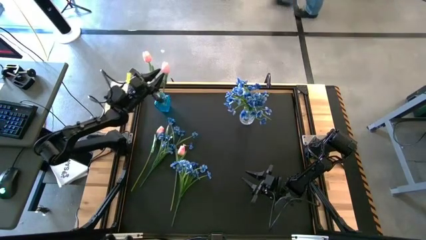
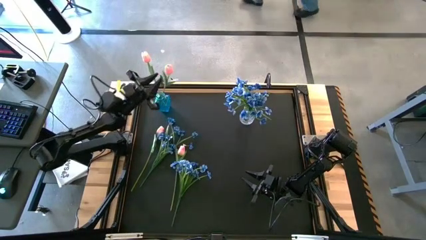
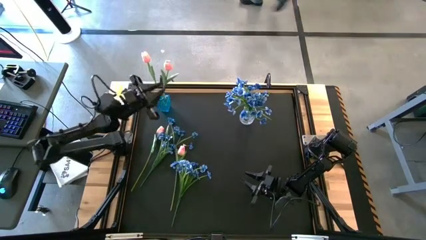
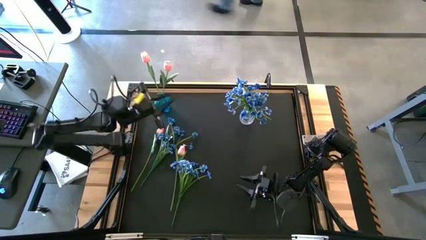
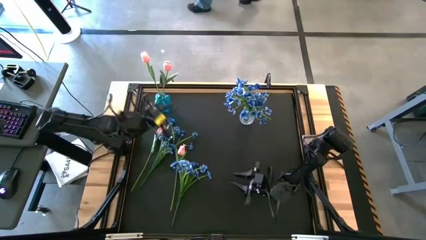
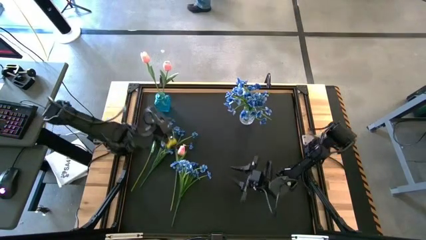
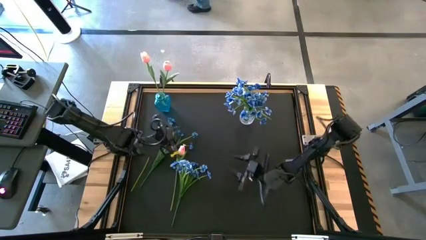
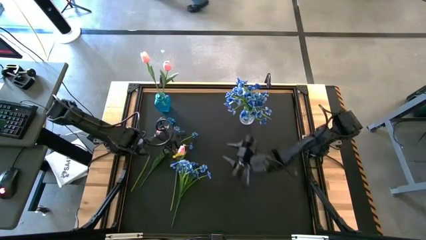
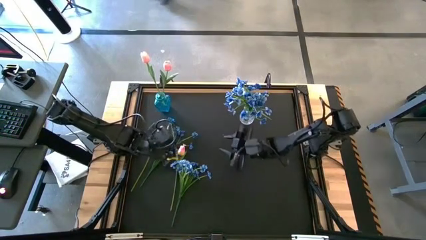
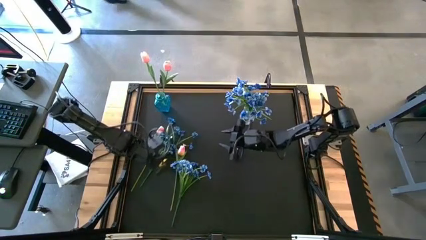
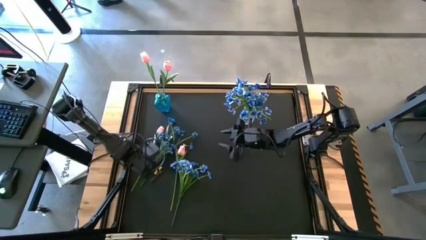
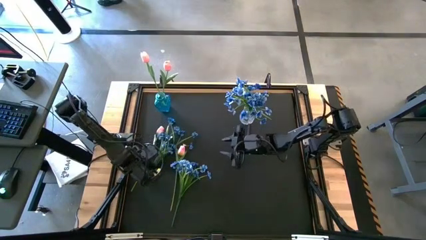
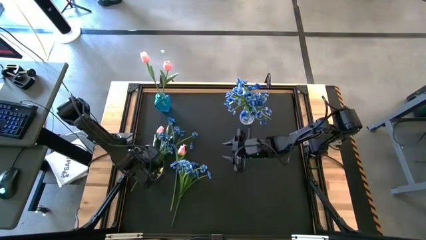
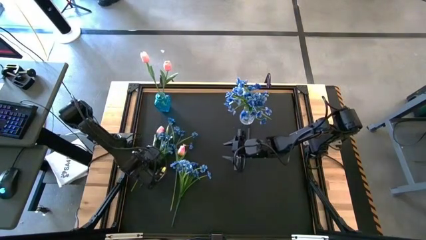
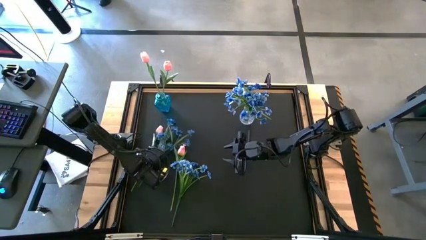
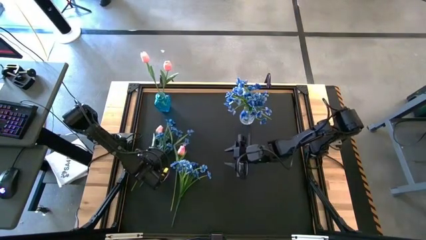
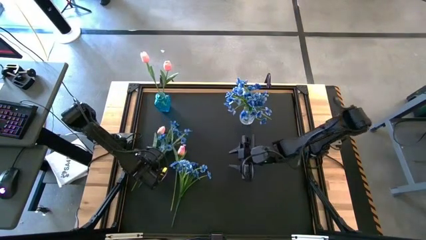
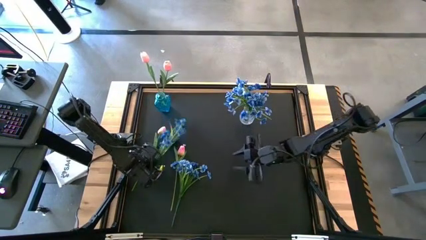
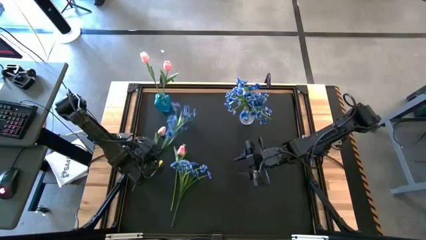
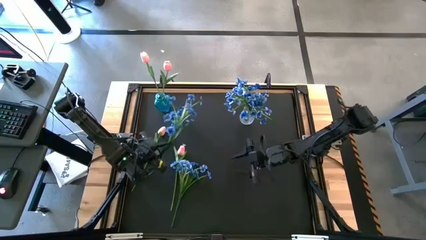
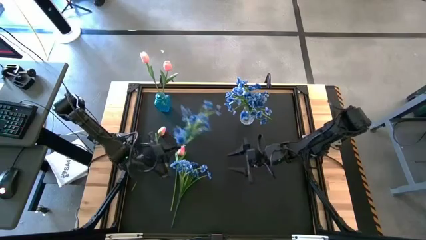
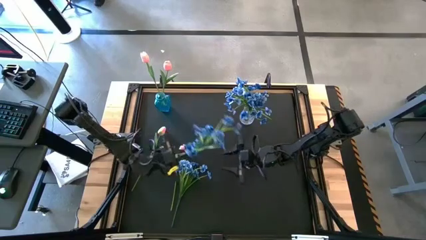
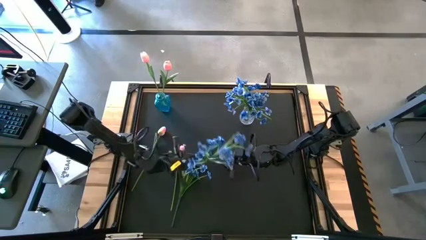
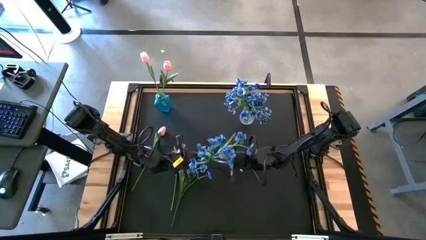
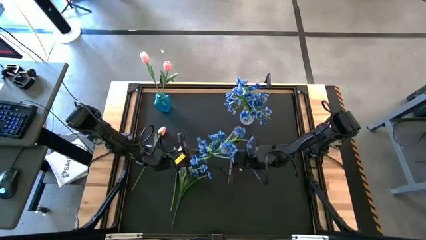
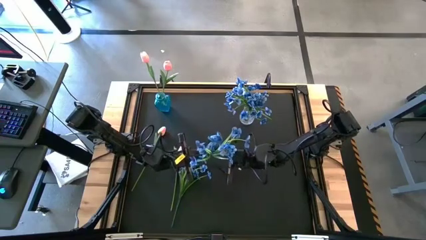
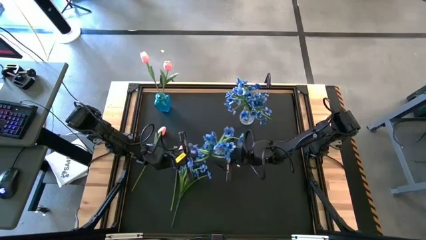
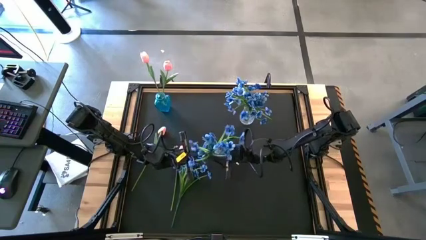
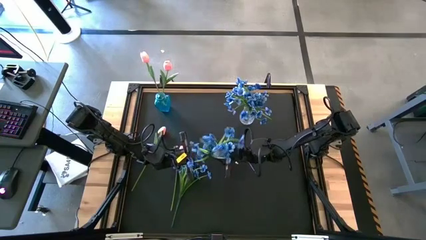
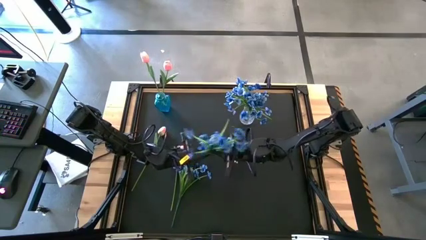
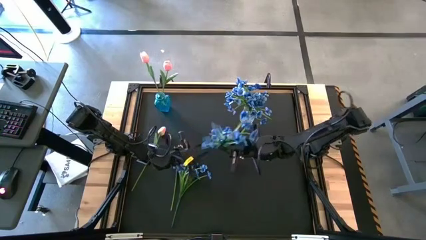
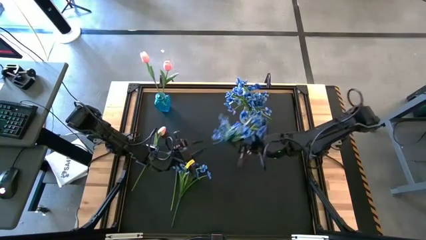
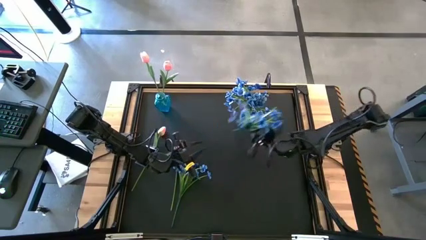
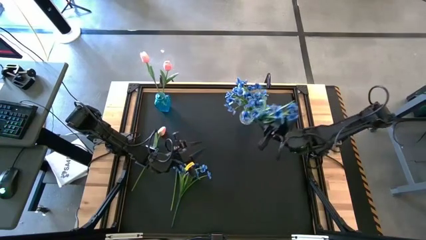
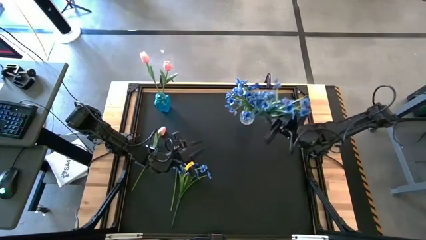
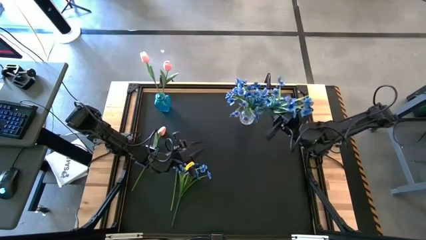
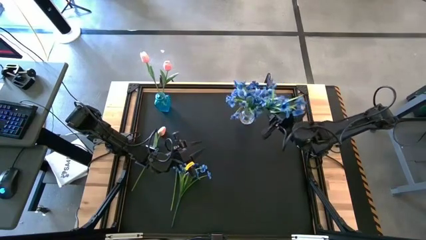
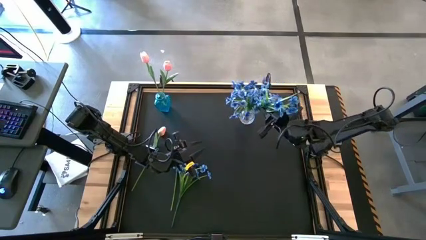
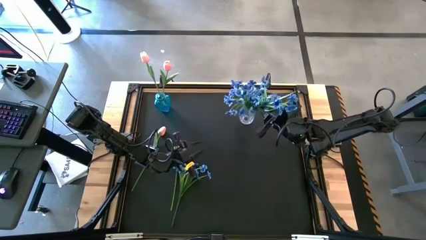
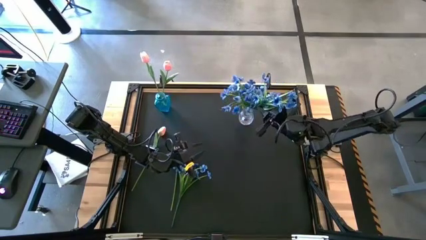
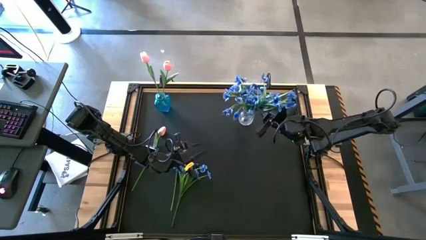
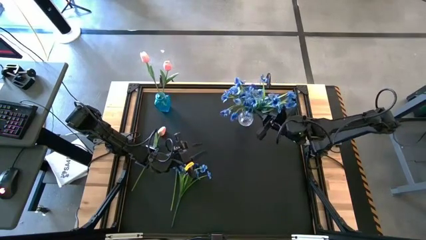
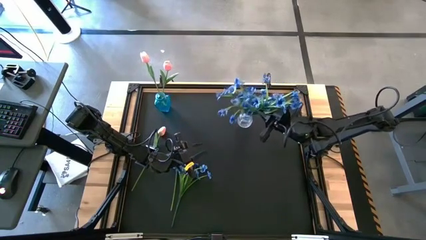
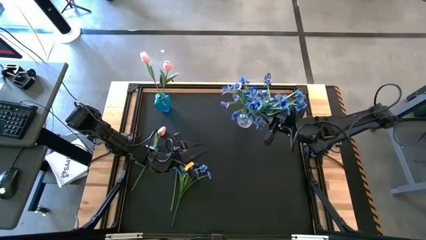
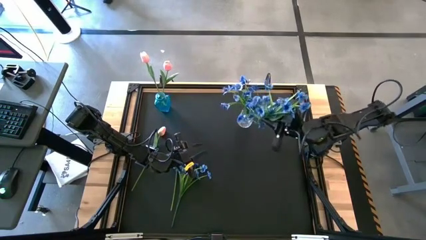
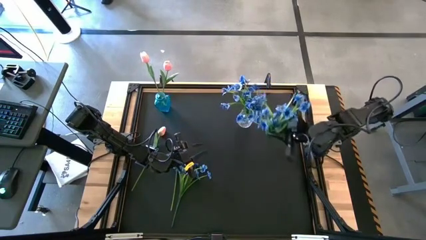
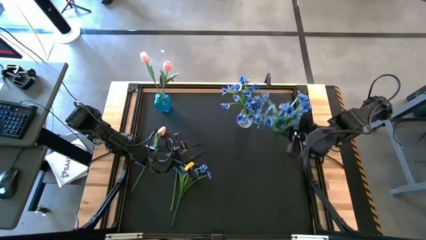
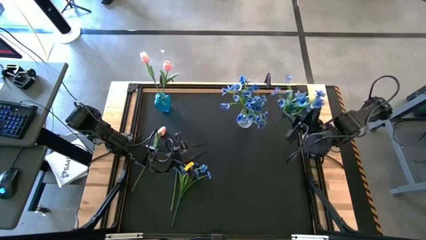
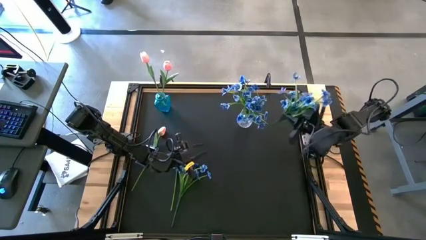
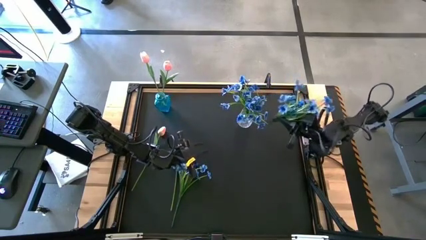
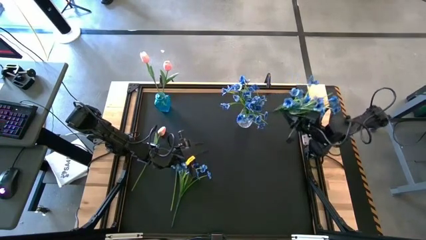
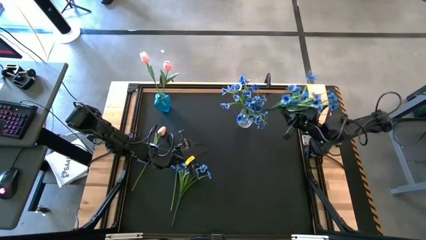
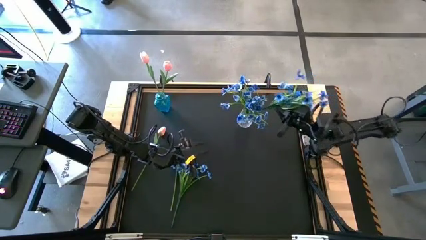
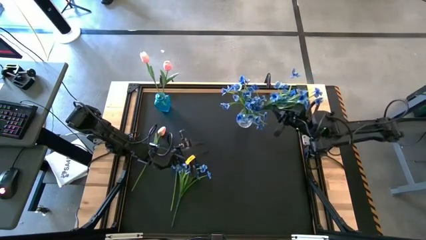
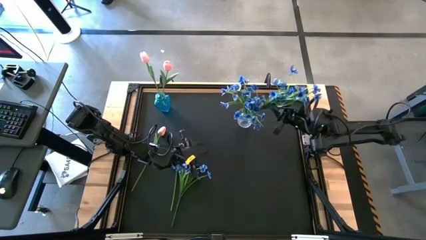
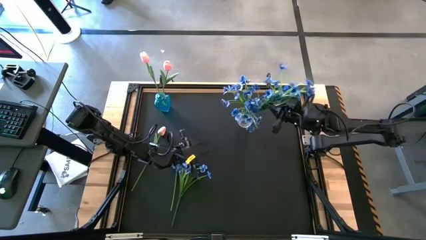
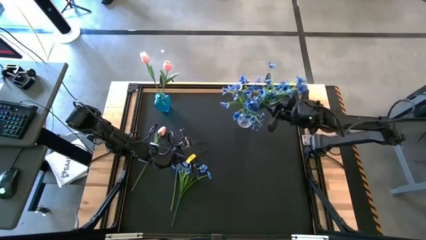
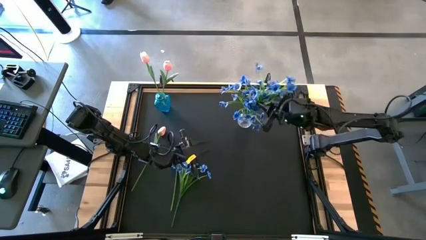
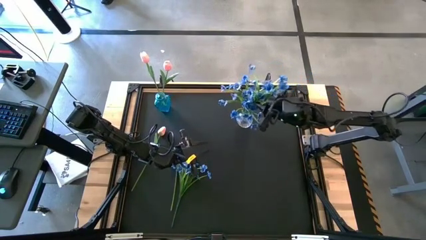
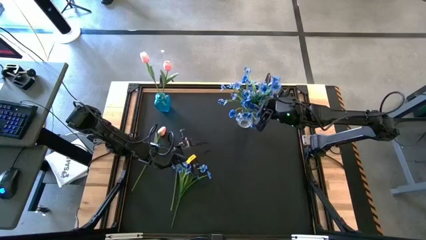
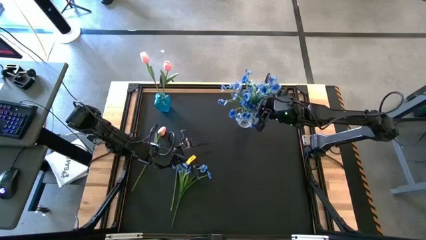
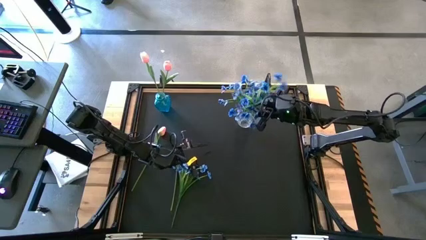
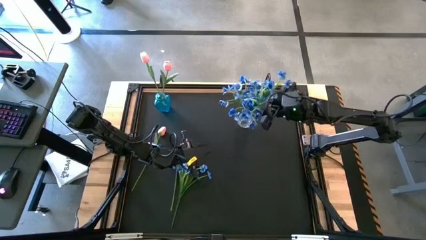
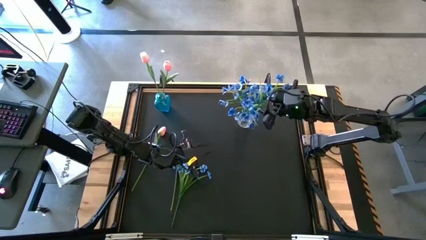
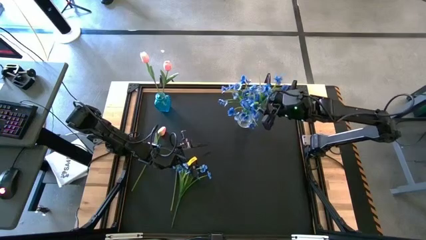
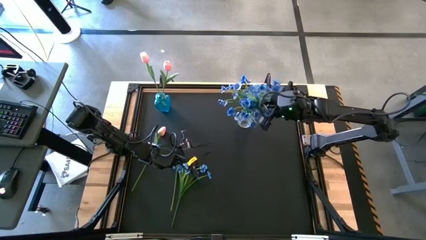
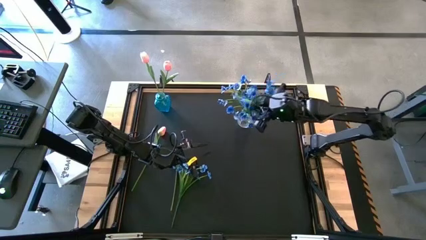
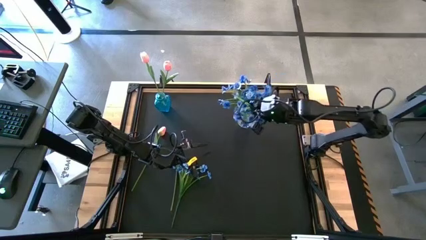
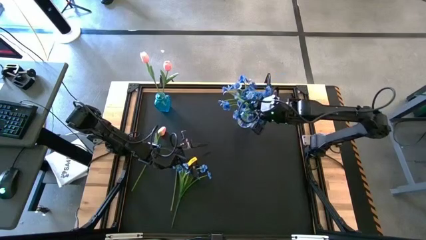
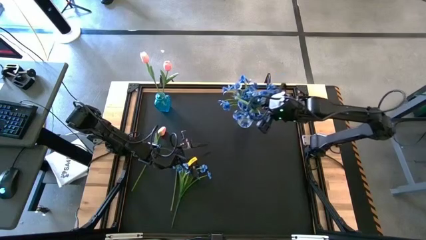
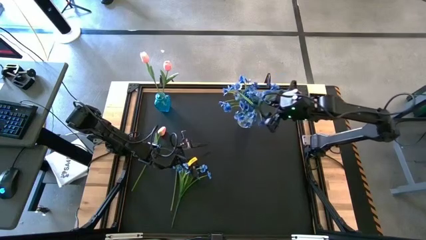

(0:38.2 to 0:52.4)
Task: Sort flowers into vase by color
Put the blue flowers into the transparent vase

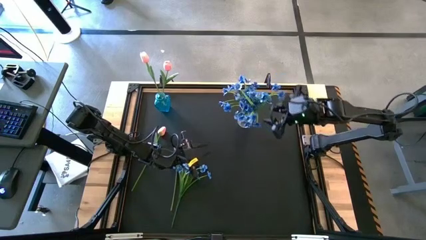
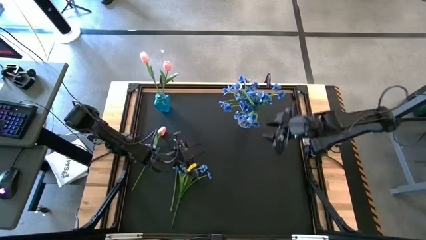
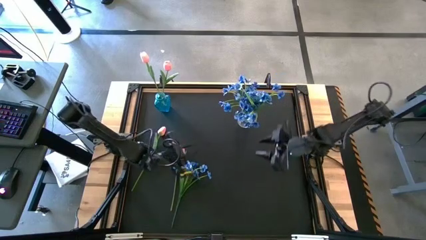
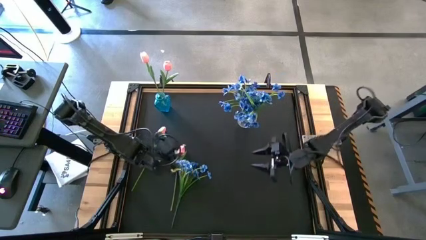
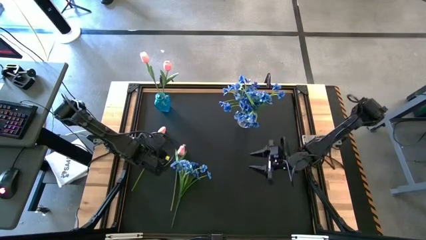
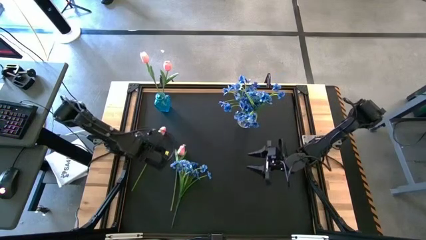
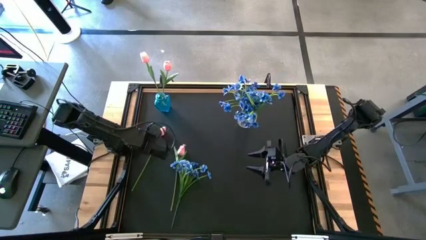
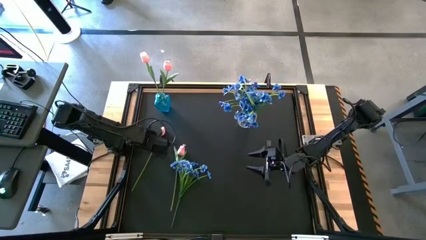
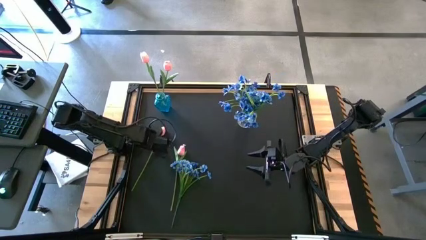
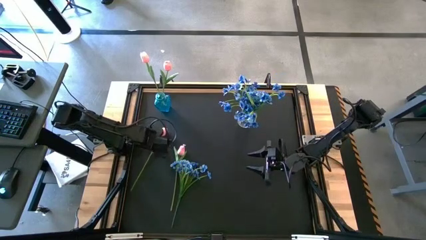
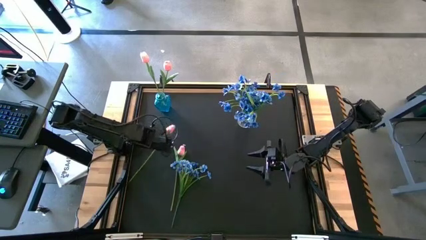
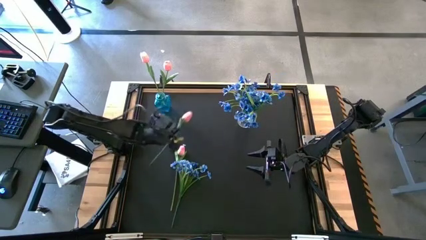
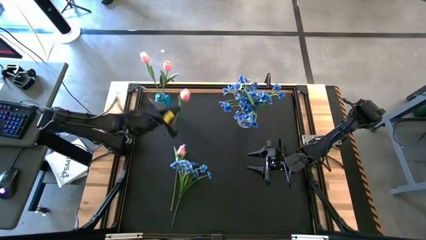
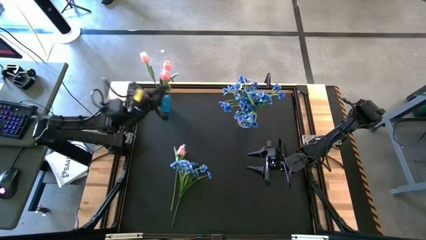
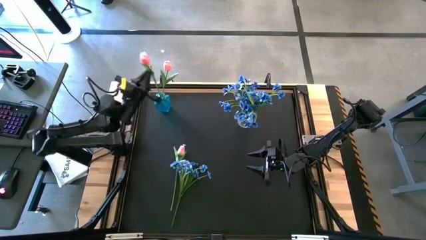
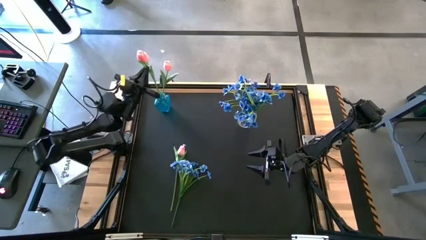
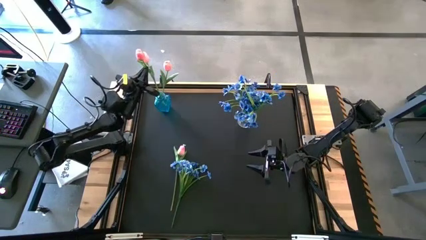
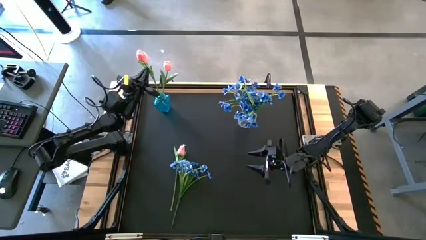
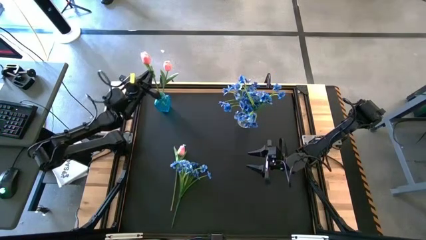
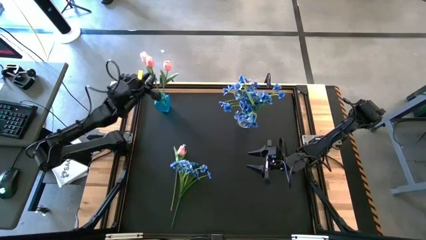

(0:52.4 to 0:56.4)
Put the pink flower into the blue vase
